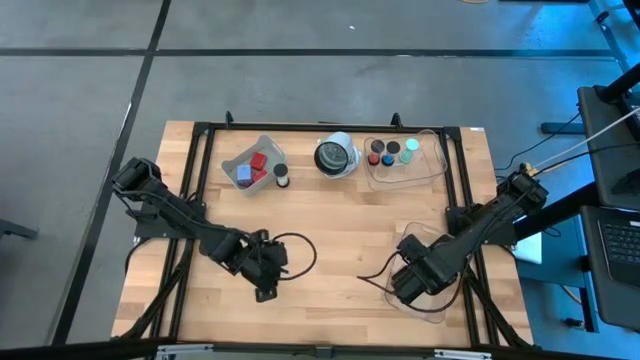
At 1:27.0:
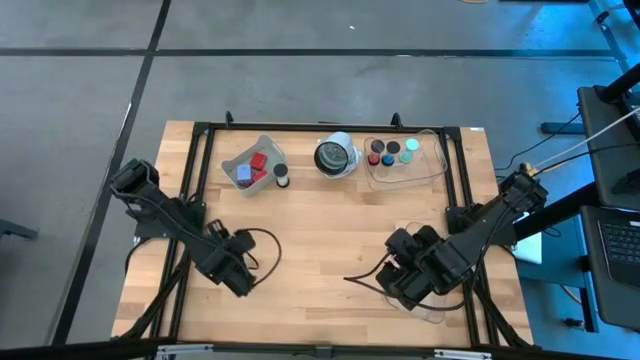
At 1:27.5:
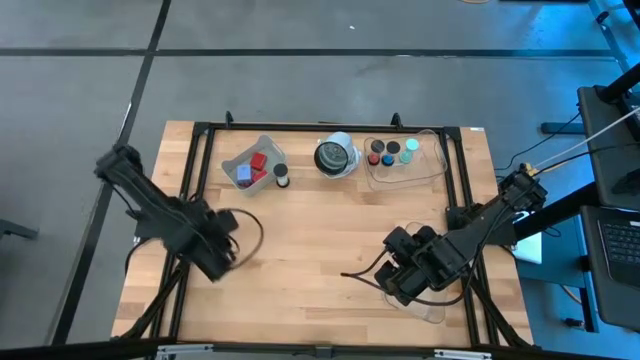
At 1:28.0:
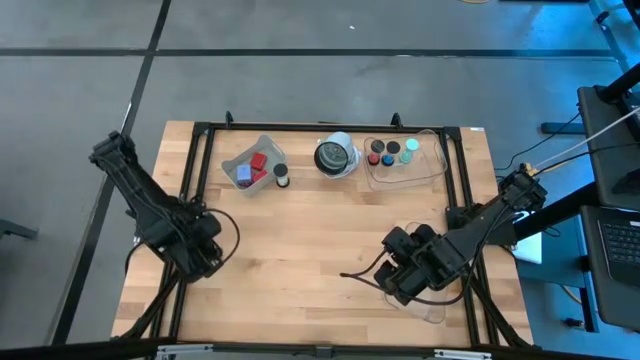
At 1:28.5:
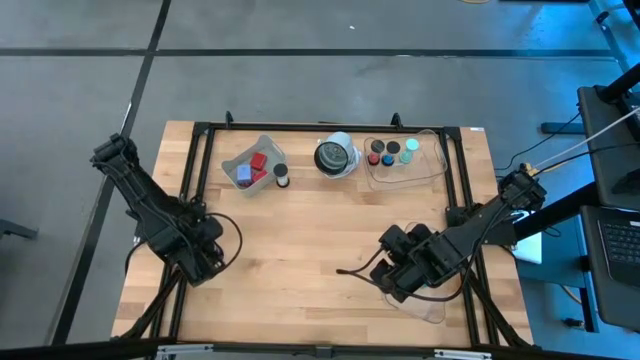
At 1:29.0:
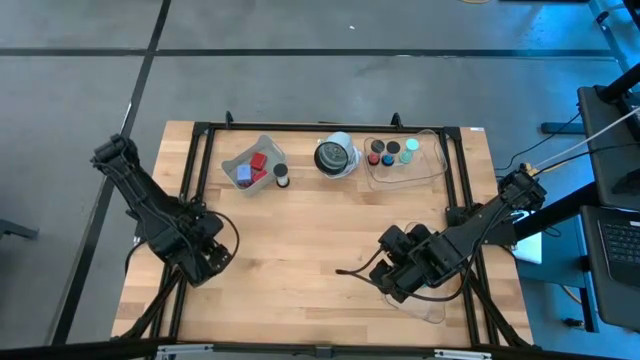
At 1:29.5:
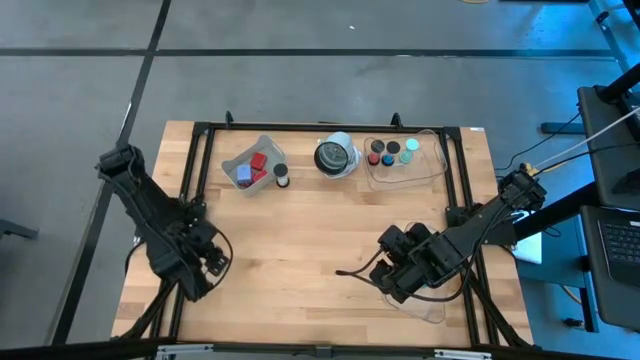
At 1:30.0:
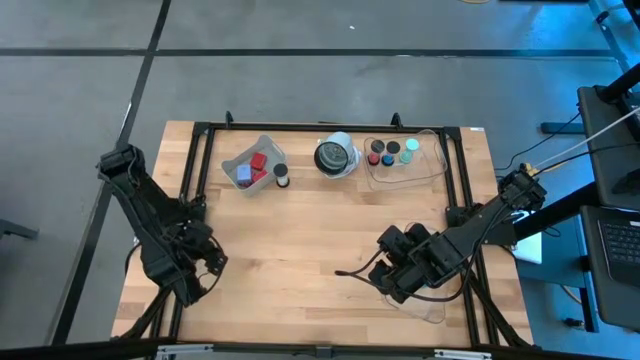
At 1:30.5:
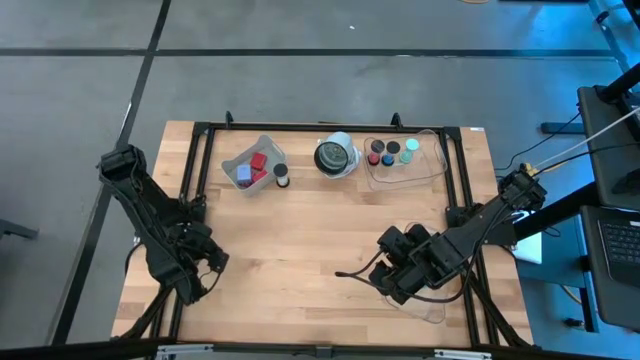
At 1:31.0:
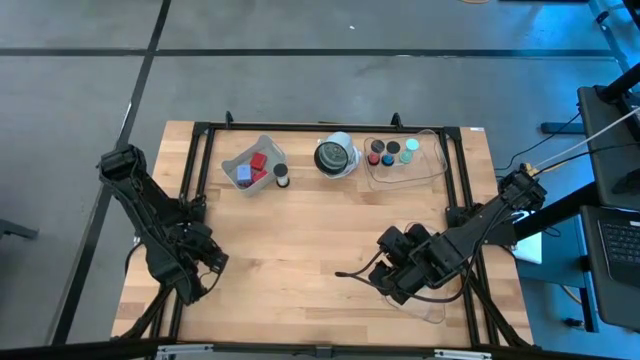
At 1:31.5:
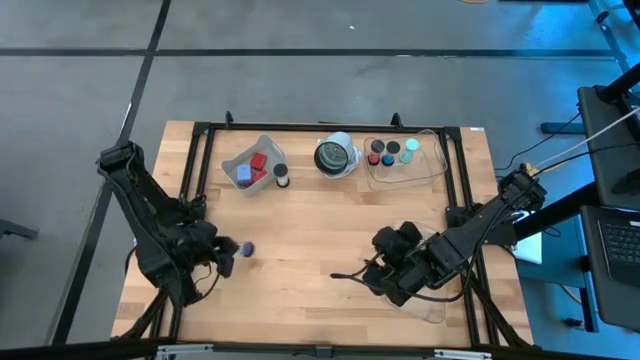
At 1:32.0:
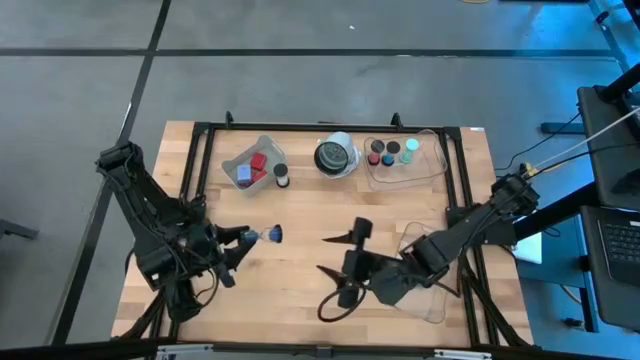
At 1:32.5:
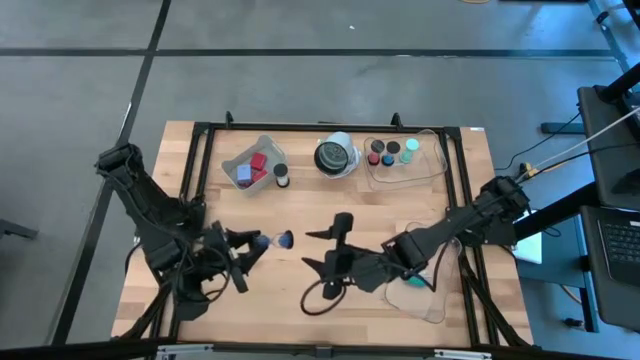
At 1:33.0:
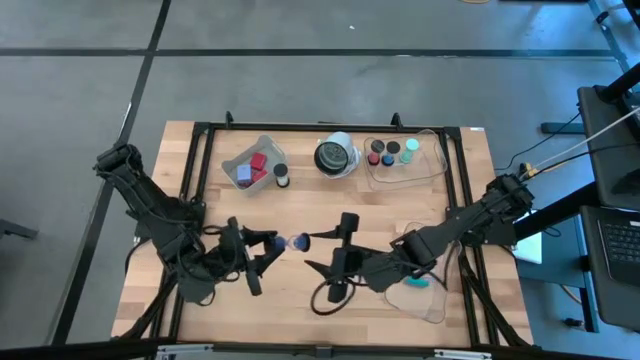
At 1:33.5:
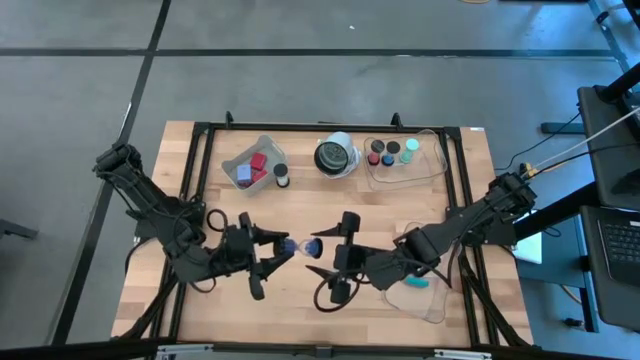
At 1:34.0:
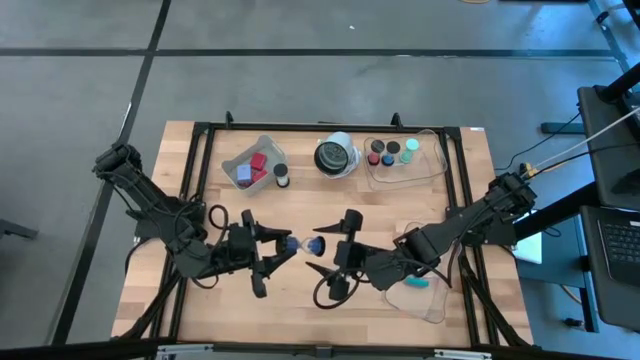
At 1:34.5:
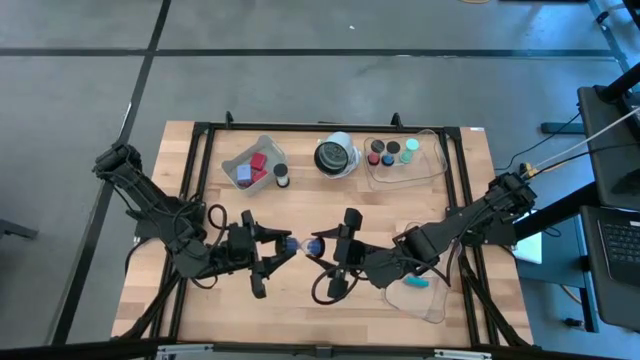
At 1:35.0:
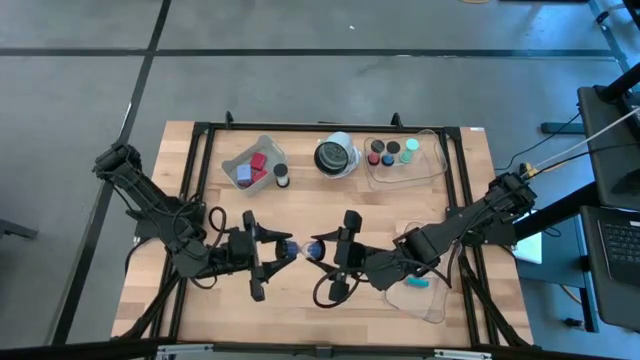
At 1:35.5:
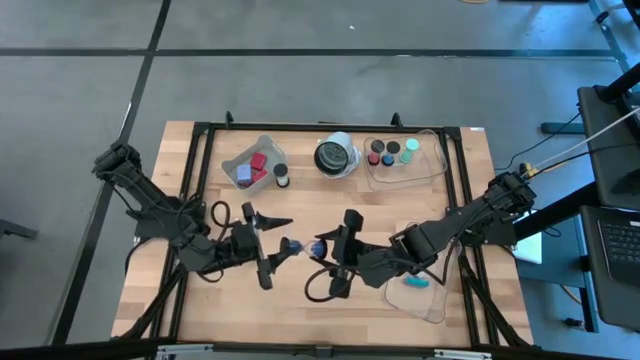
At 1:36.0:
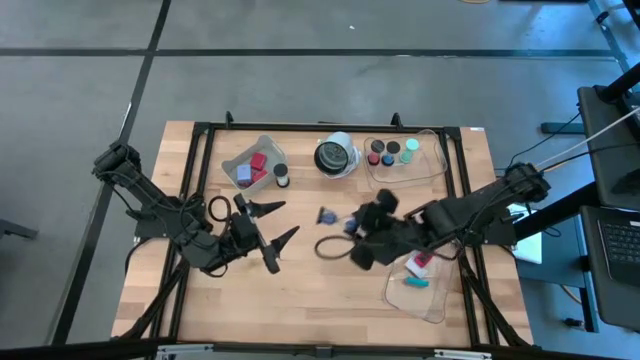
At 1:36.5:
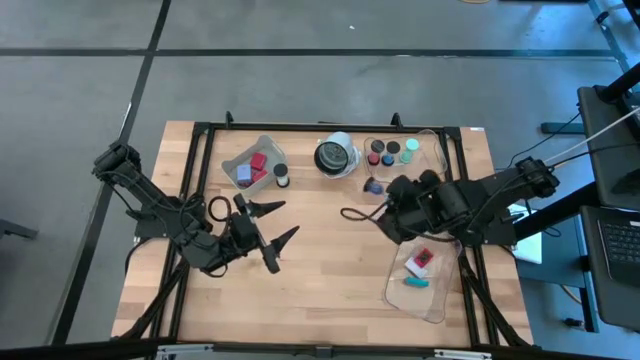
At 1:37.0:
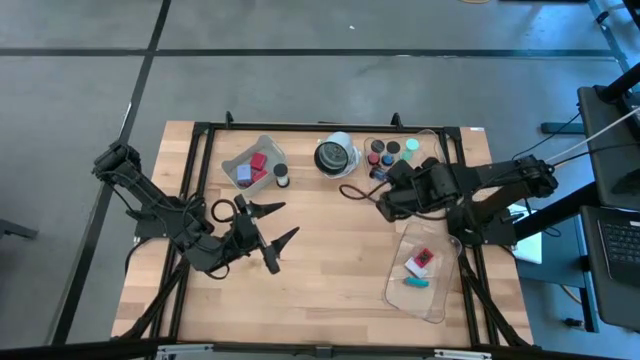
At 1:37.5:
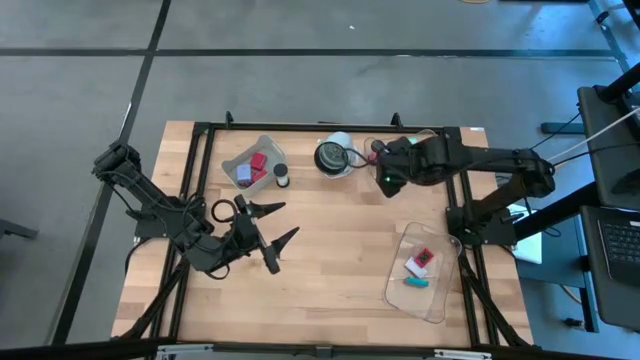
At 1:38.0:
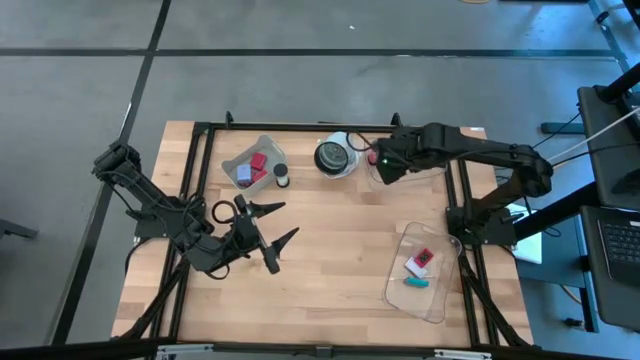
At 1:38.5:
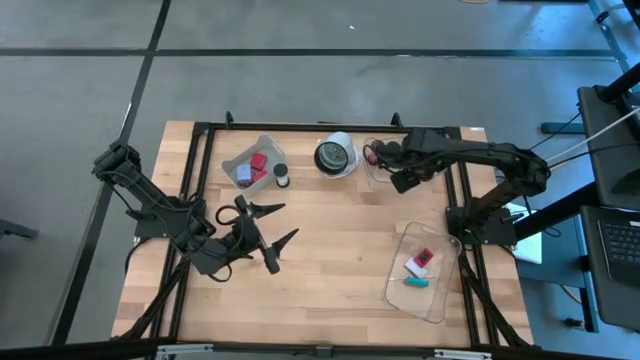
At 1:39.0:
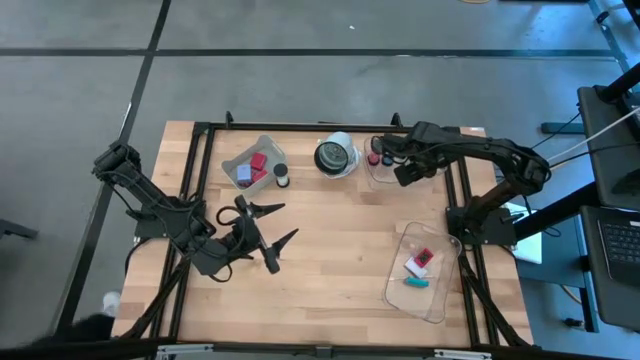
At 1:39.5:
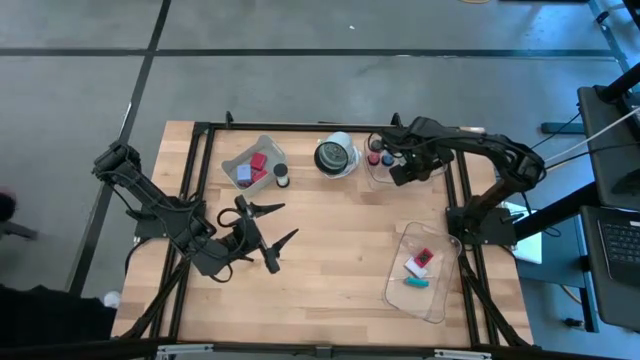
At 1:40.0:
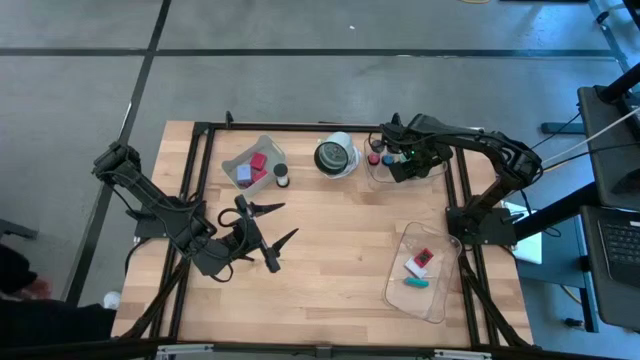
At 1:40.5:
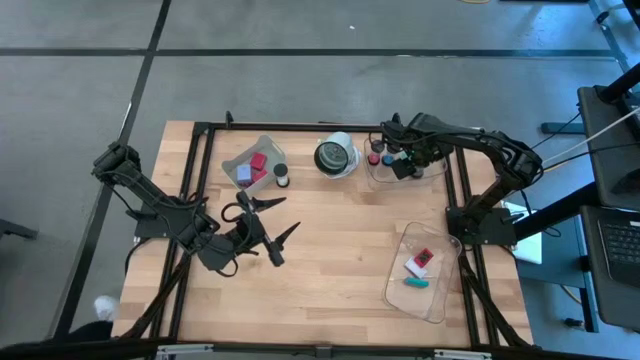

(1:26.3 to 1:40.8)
Task: Pick & Place Office items
Put the blue hourglass into the top transparent bin

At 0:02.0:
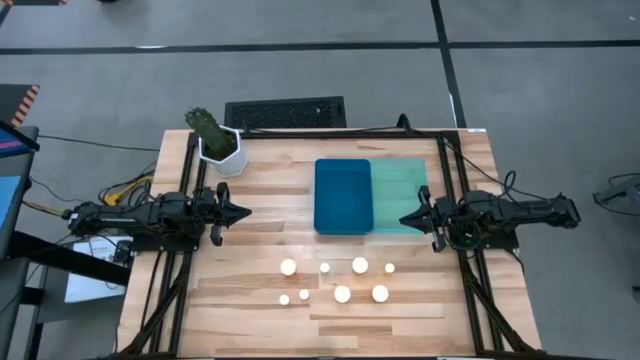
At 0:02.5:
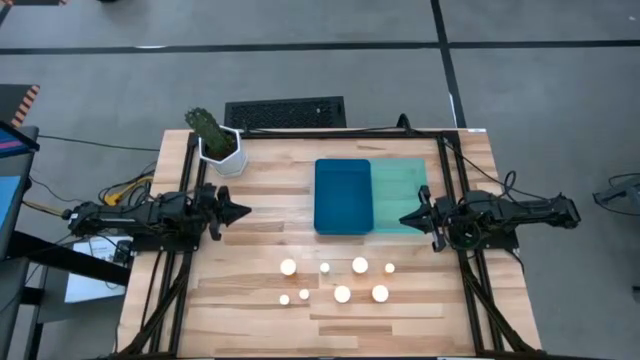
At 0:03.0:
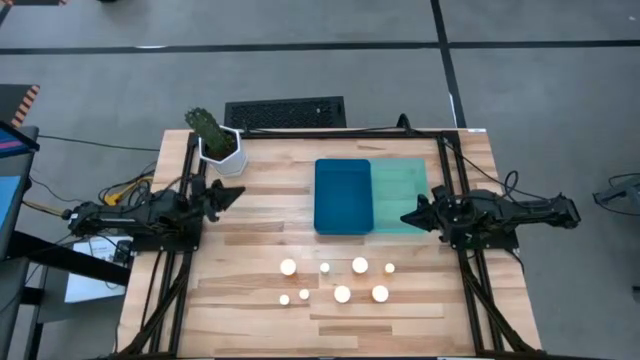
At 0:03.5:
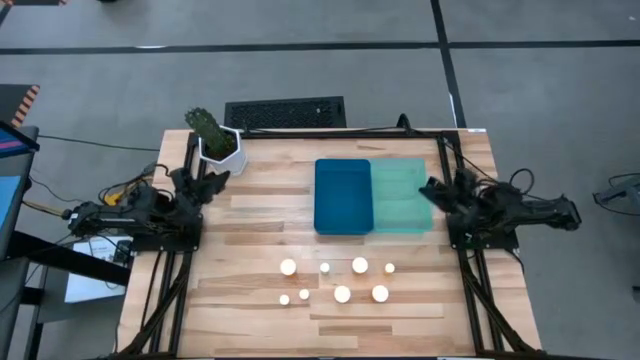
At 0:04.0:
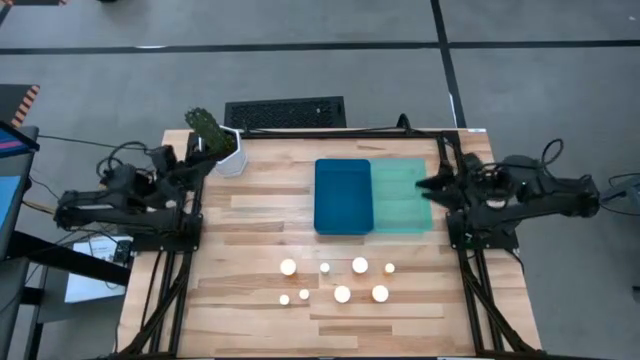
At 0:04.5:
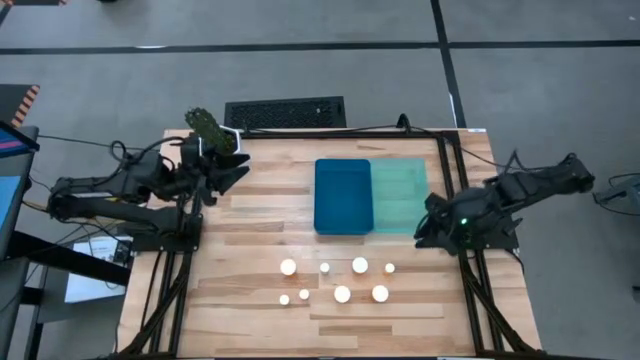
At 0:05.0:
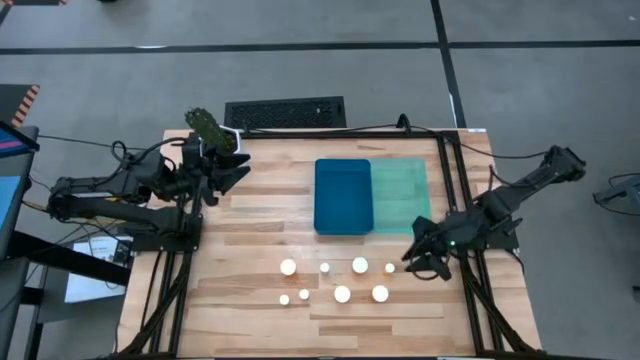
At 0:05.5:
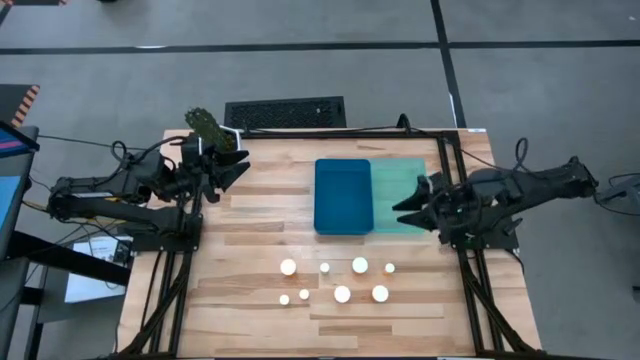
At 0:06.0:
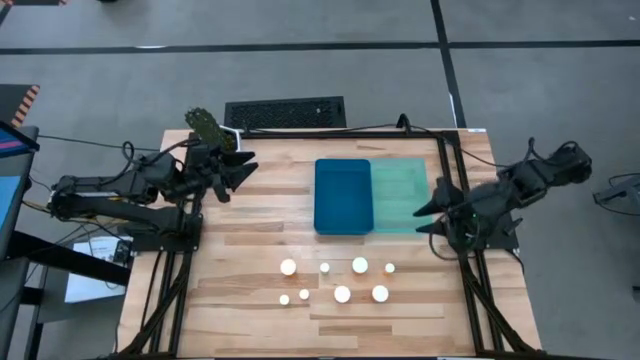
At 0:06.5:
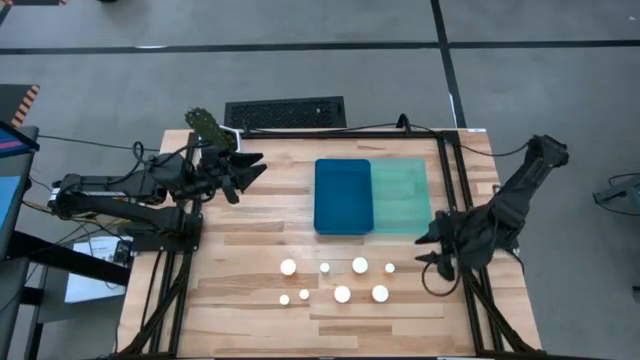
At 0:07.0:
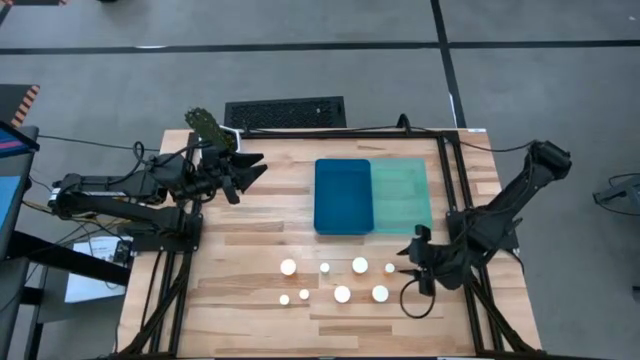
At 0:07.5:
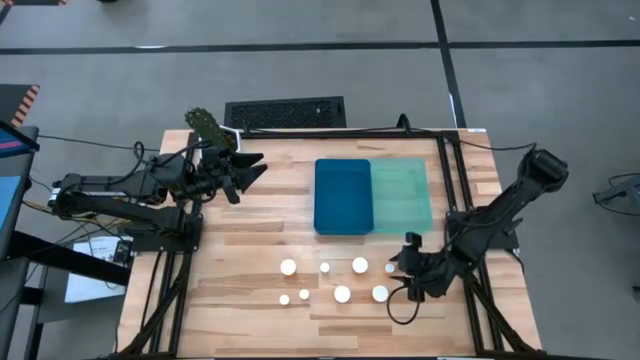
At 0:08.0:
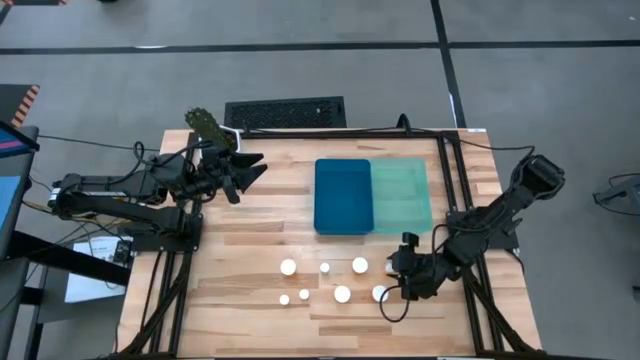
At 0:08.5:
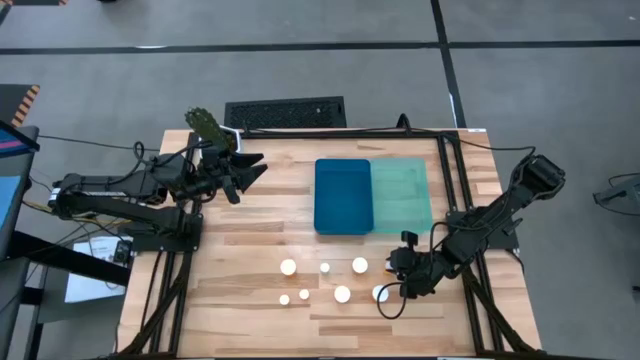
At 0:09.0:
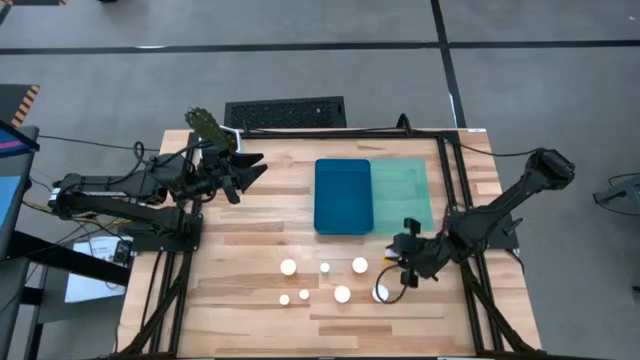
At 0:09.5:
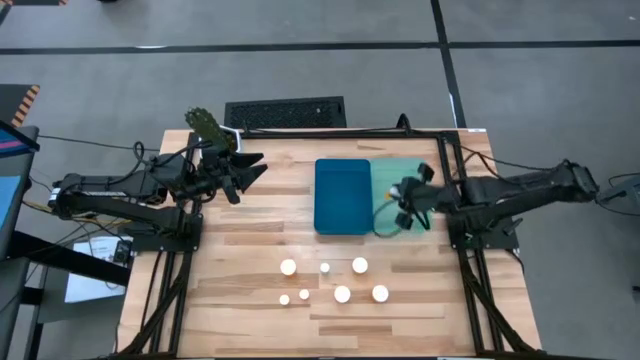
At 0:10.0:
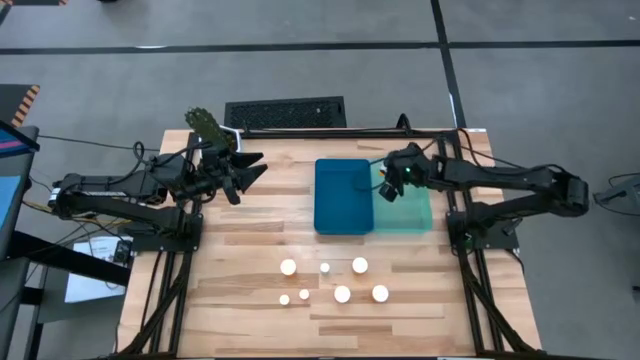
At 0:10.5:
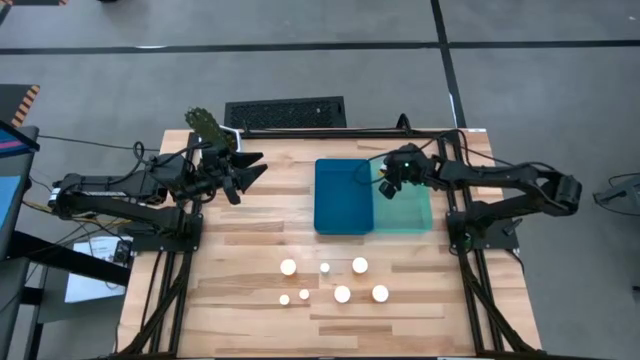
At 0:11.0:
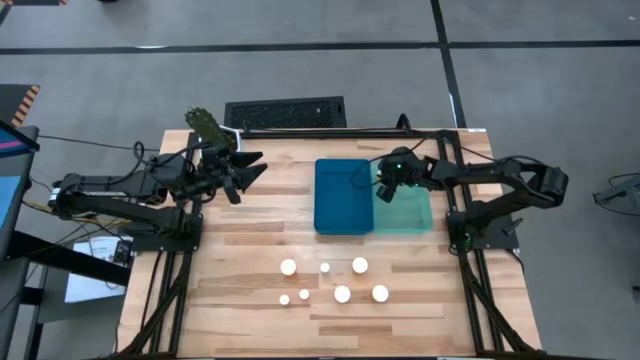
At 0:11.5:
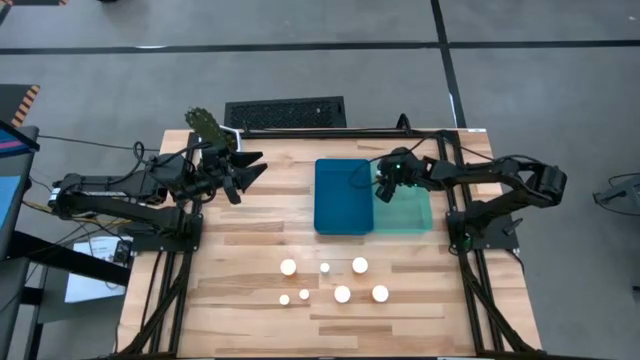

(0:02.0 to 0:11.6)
Task: Pick and place medicine bottles into bin by pill shape (circle, oval)
Put the small orange pill bottle into the green bin
